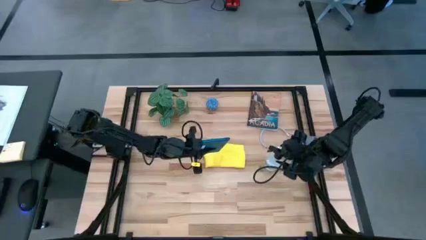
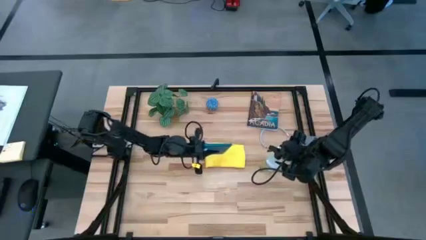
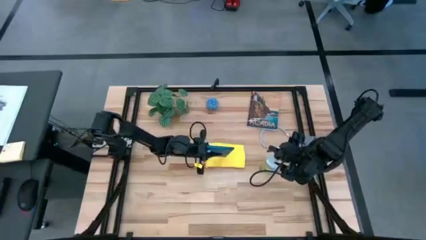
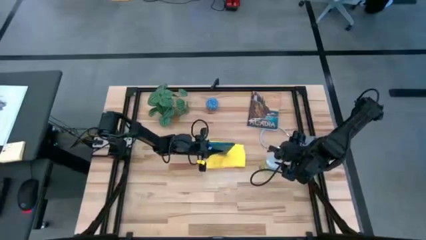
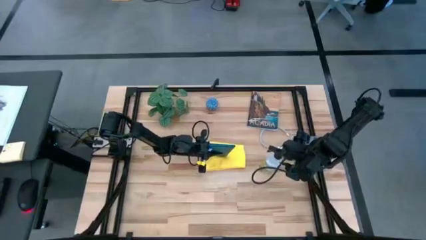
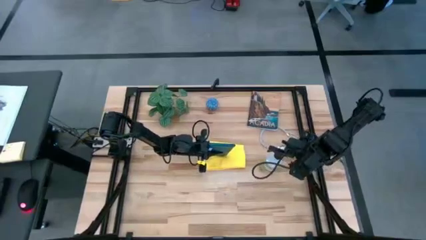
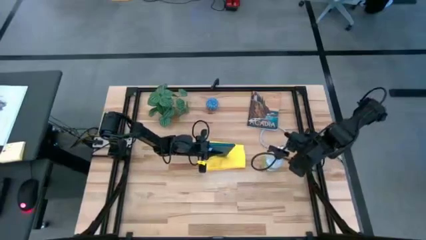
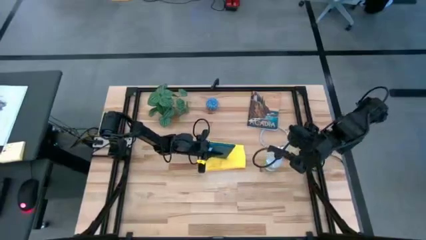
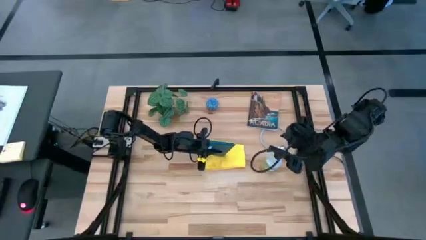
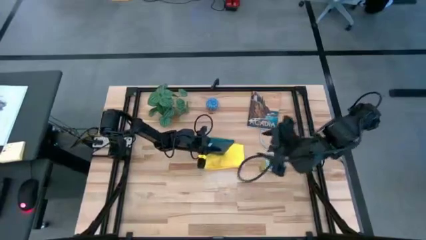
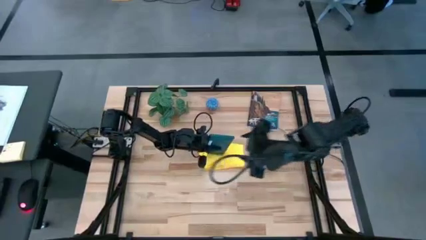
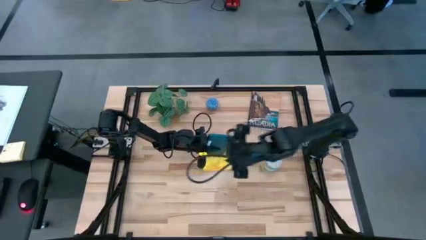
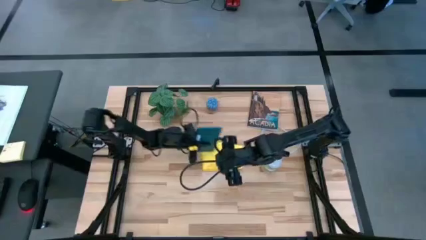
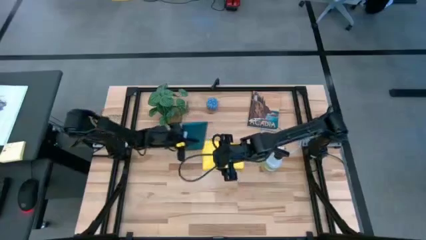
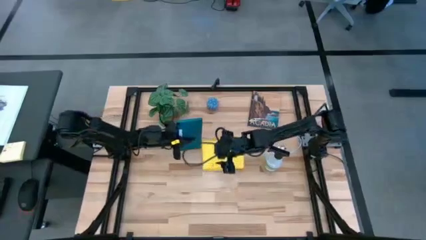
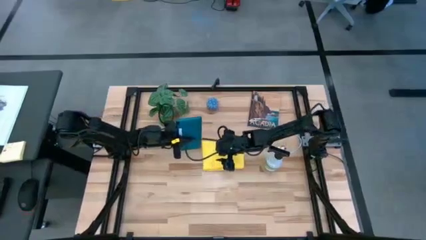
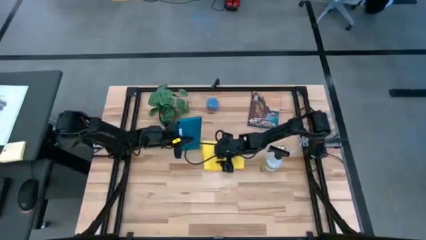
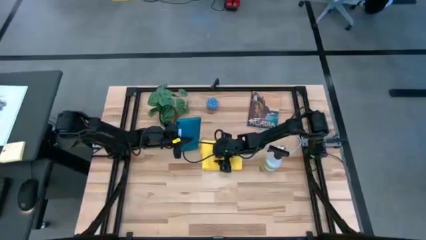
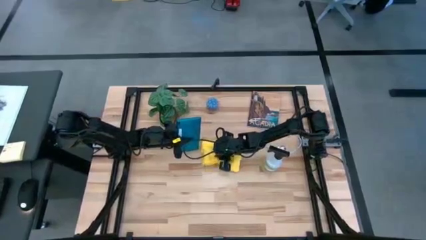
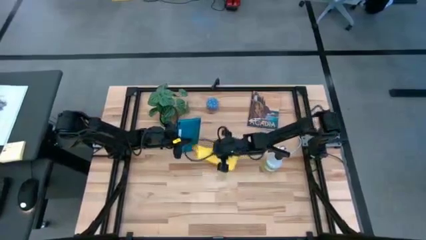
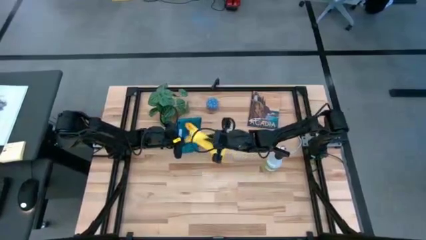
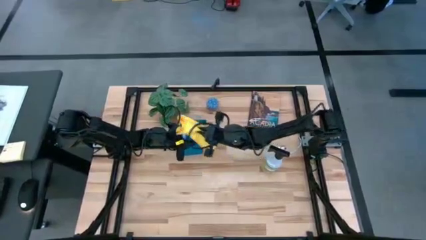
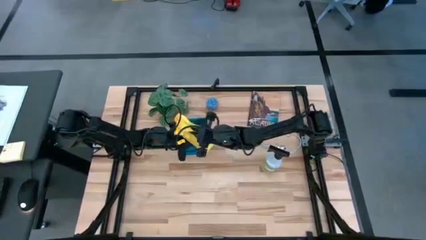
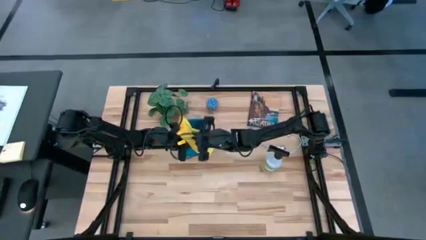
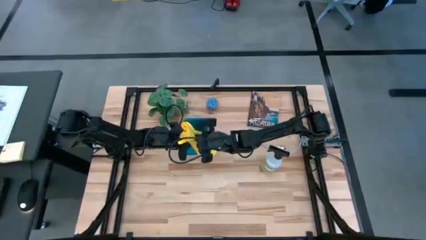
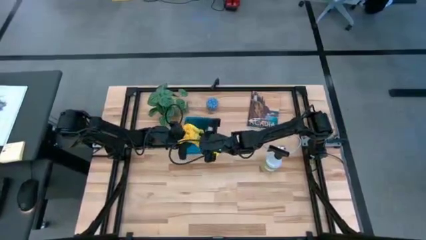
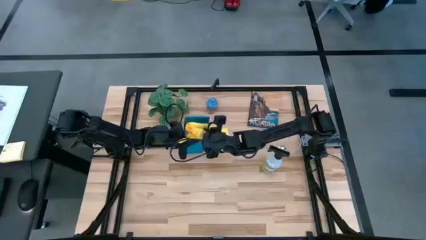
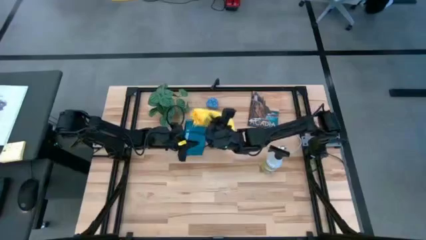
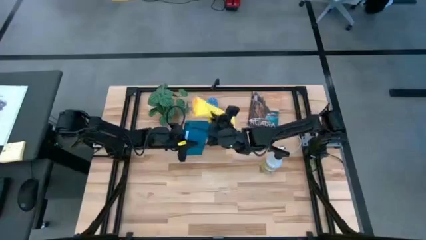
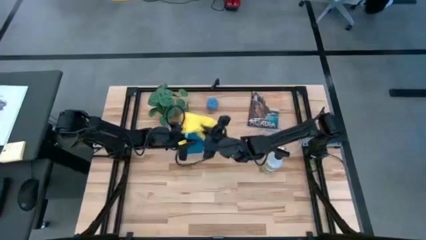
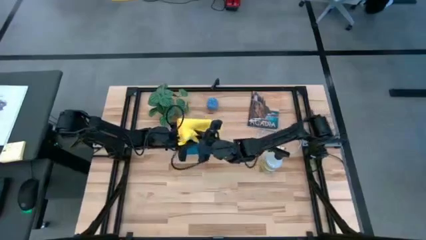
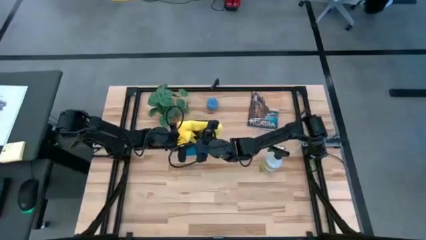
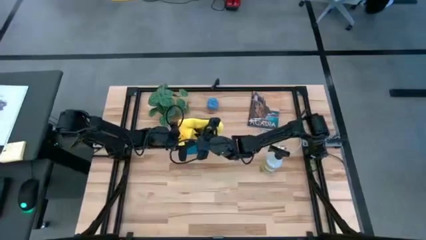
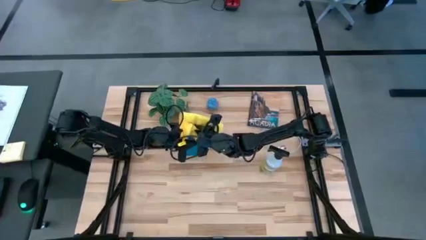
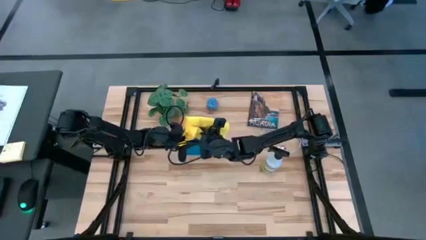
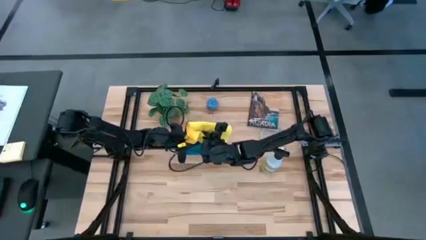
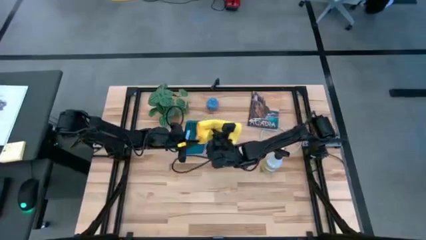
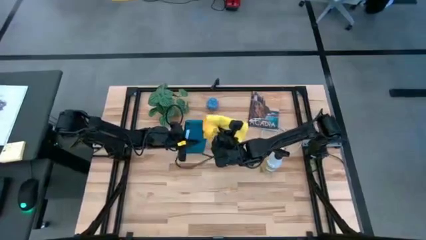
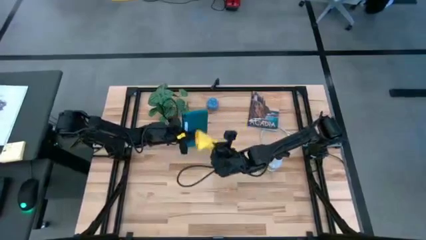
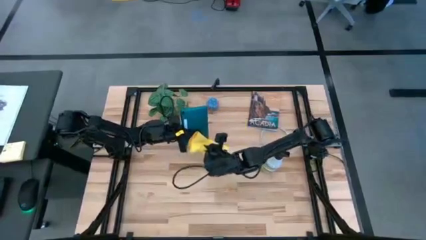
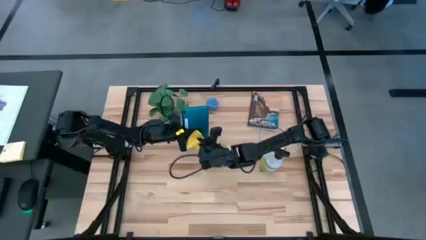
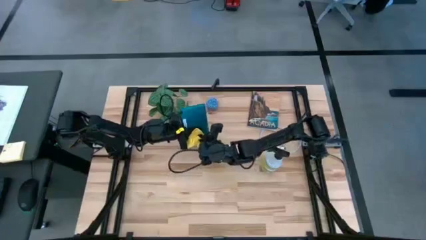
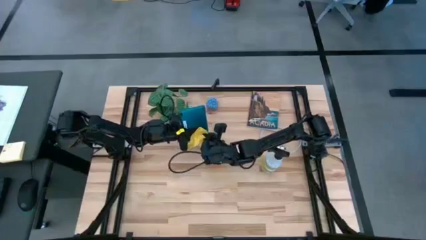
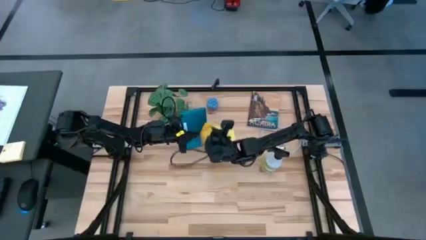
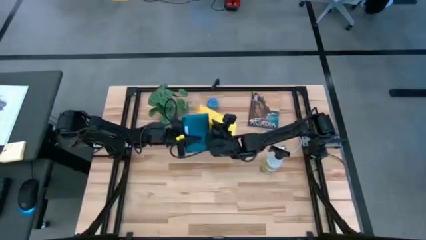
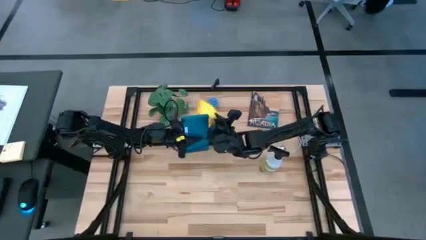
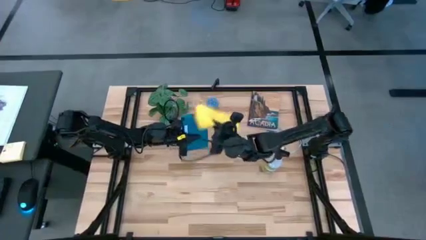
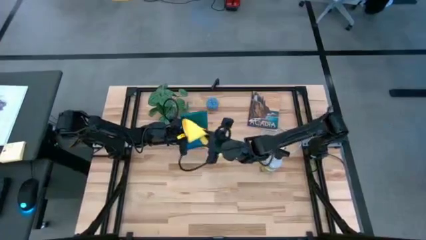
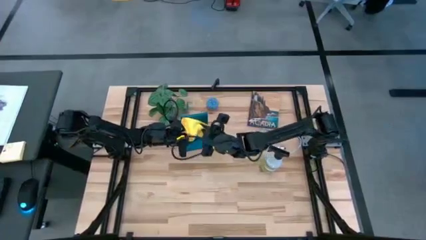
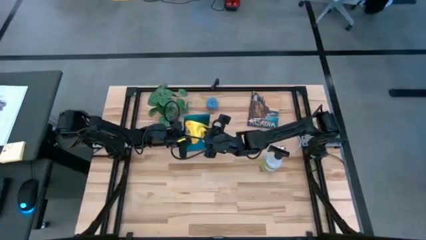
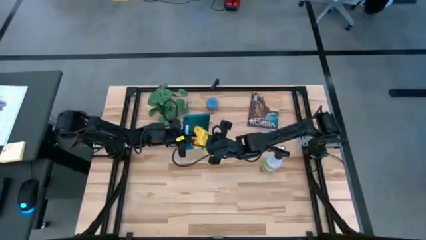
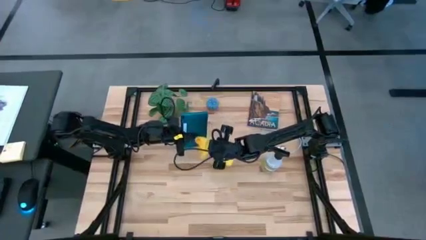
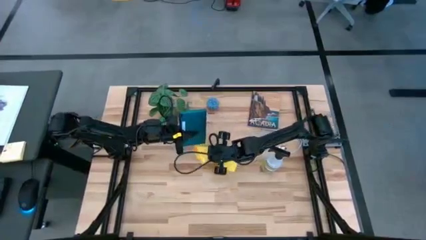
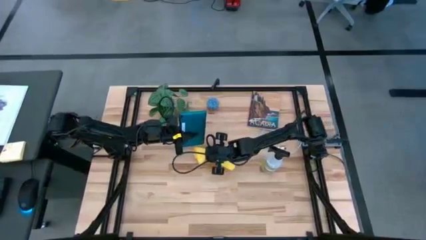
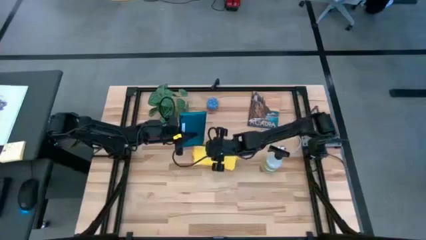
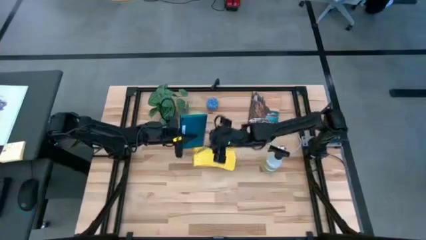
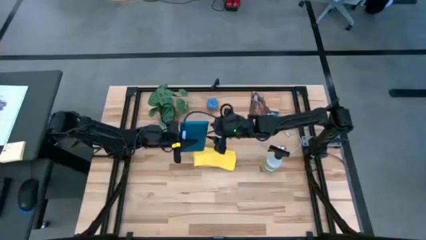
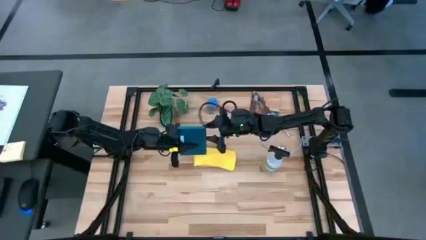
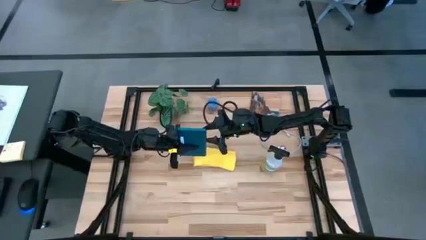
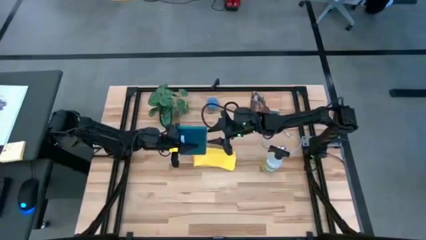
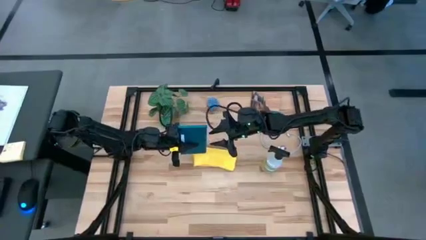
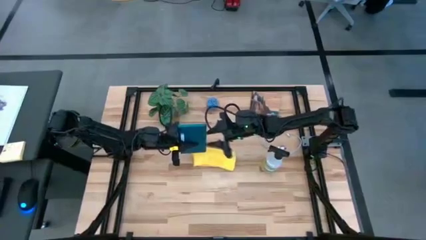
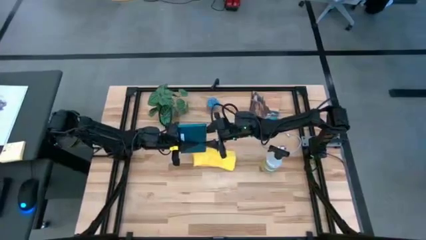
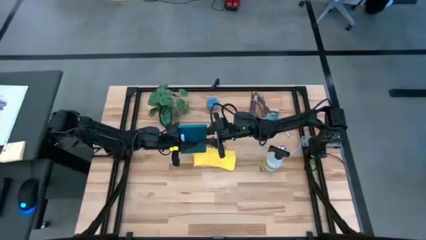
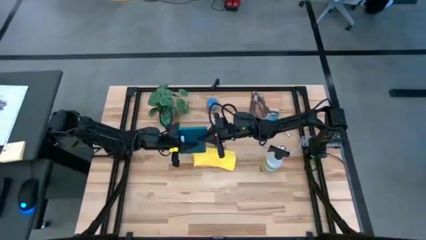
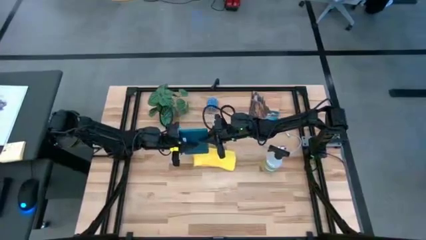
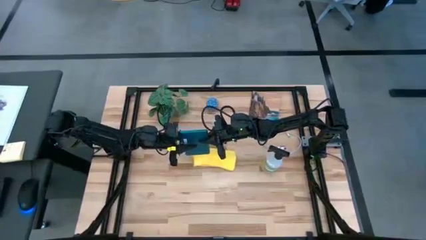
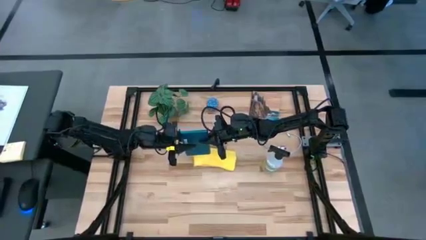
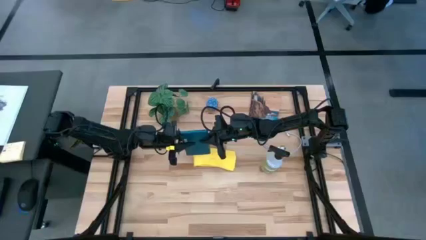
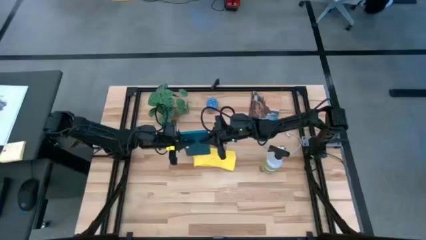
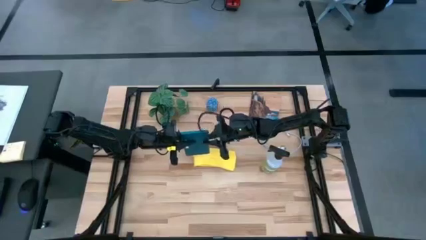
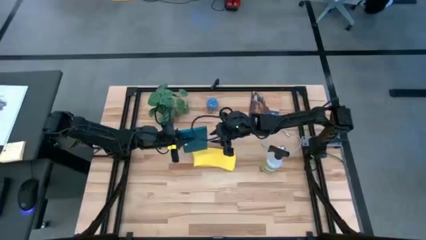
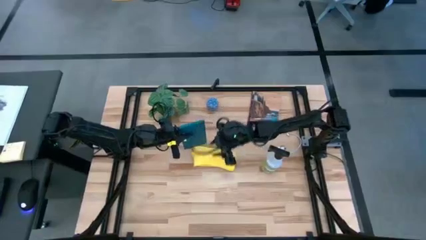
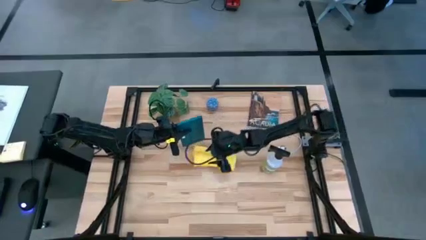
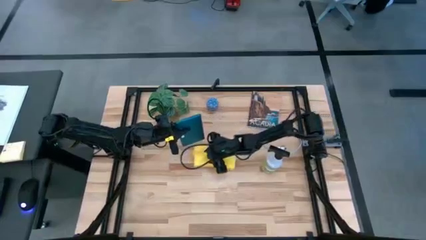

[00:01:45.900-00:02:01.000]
Task: Apply microfiber cloth
Wipe the back of the blue tablet using the yellow microfiber cloth

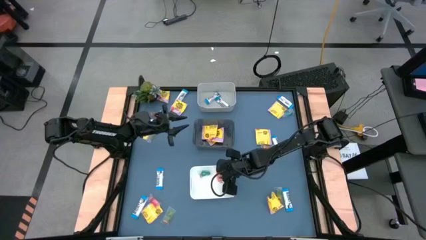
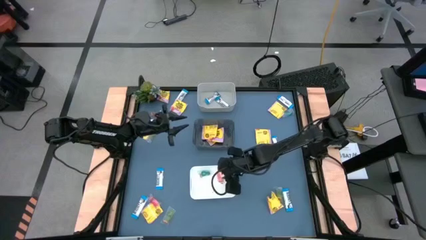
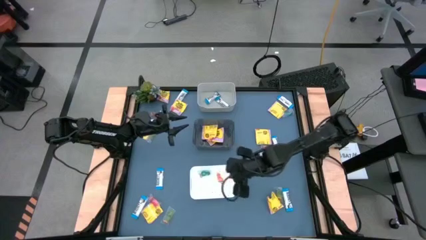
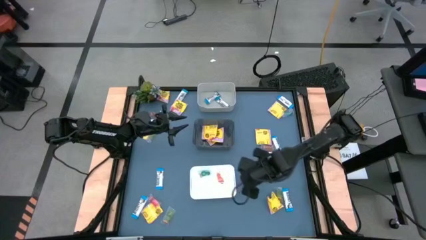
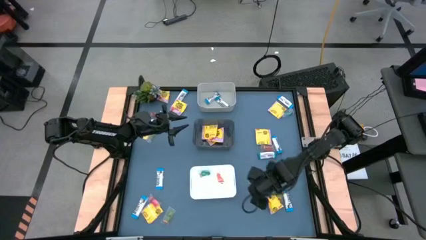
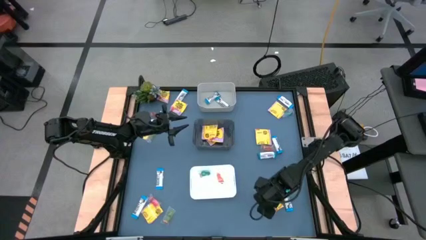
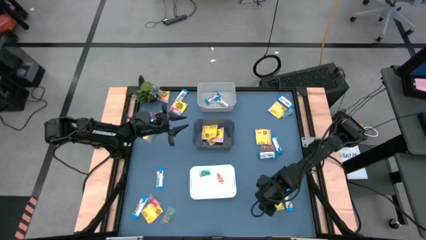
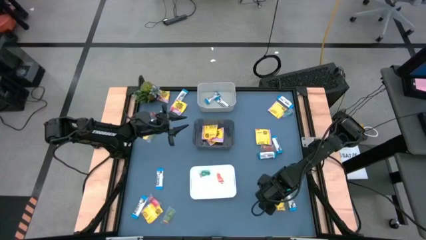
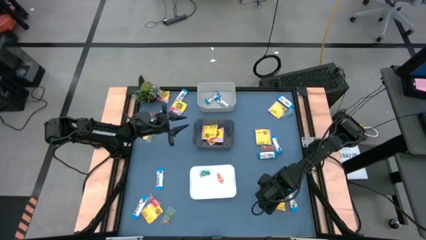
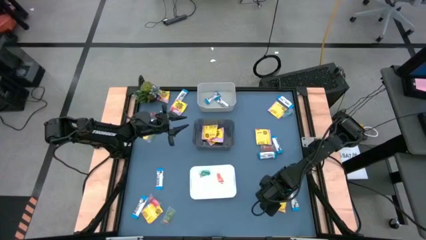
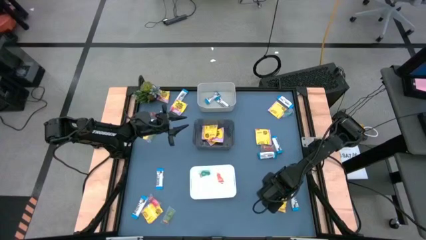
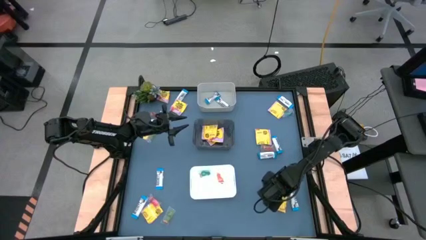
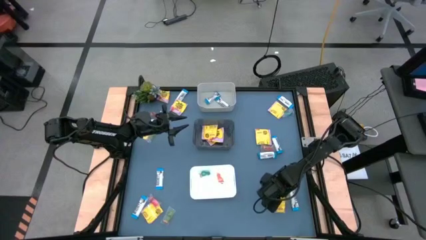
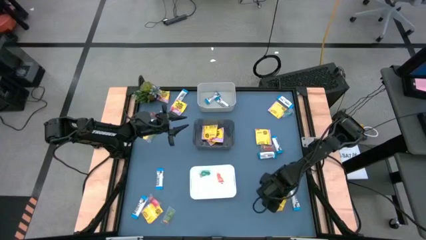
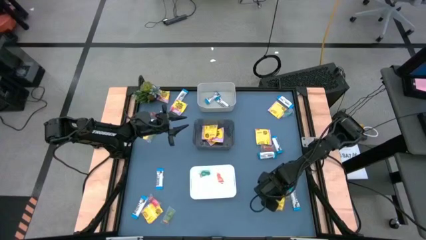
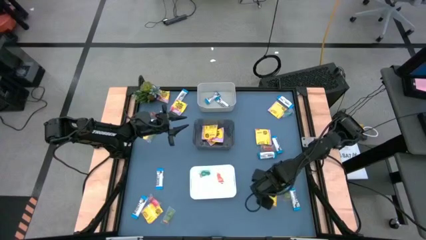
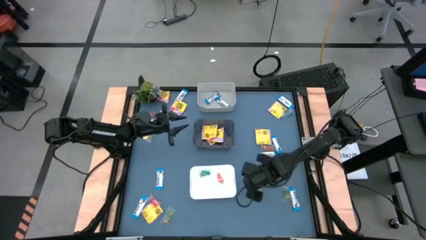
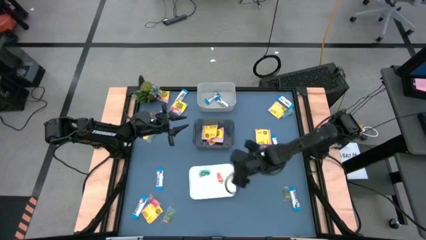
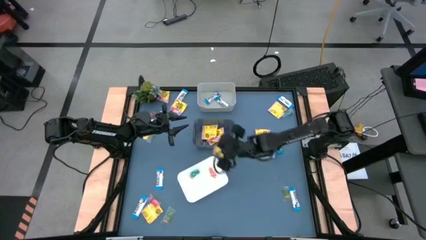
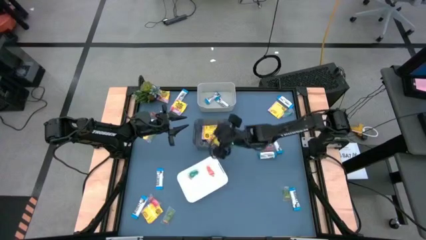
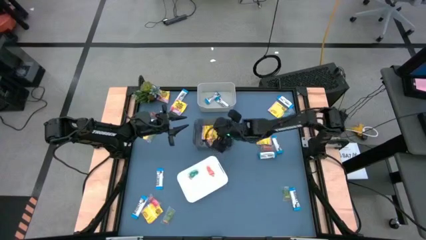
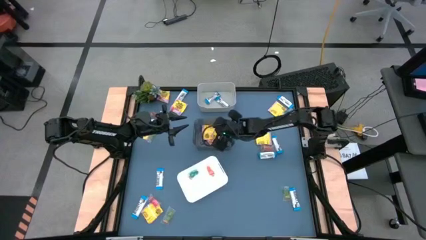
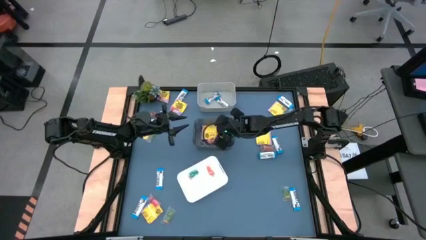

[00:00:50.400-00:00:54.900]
Task: Sort candy
Put the yellow candy into the black bin
